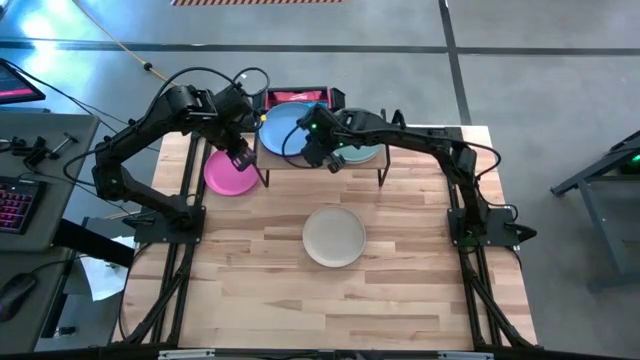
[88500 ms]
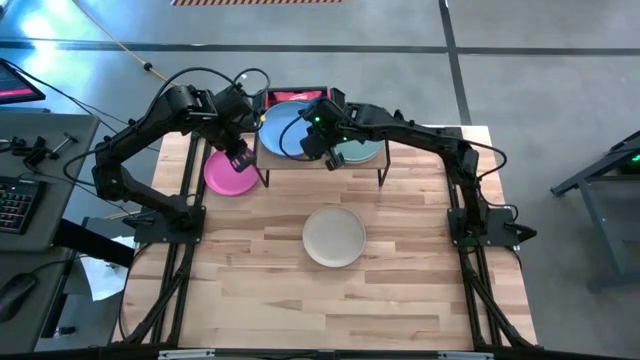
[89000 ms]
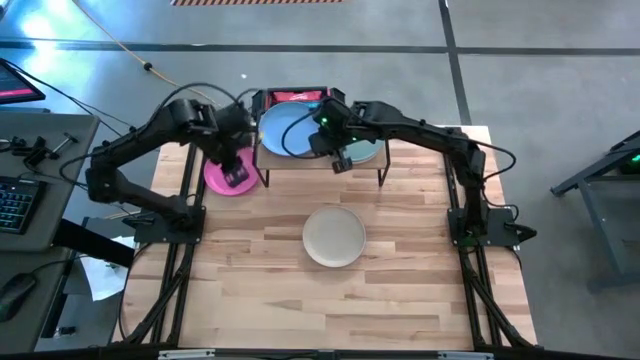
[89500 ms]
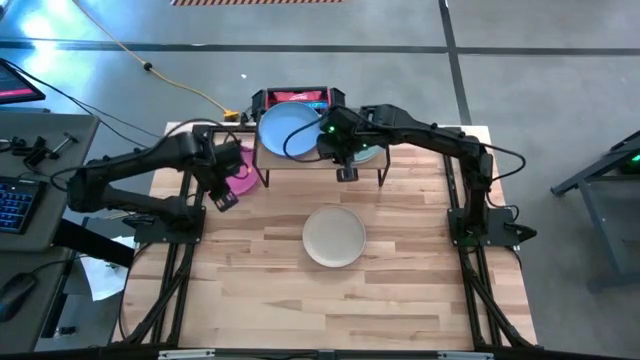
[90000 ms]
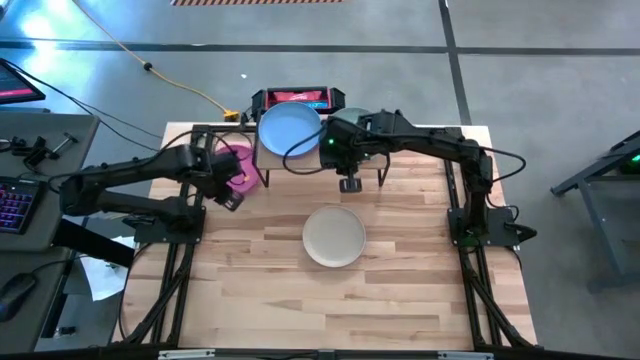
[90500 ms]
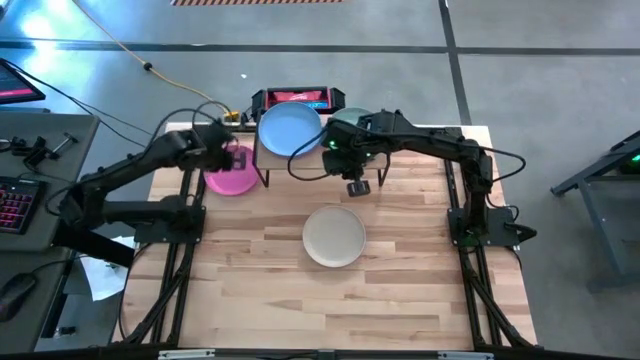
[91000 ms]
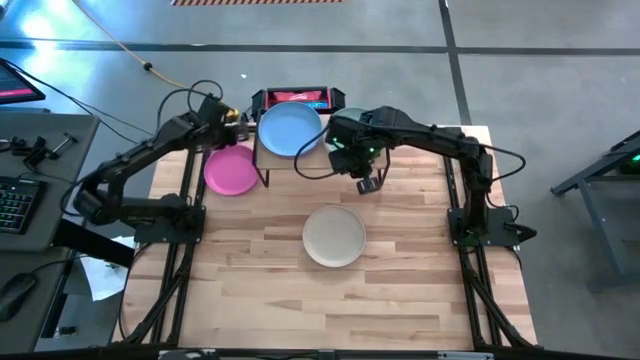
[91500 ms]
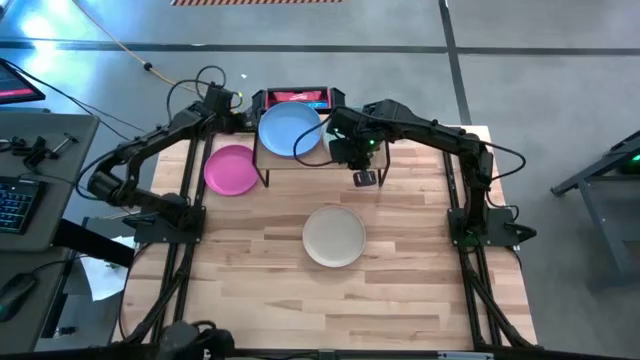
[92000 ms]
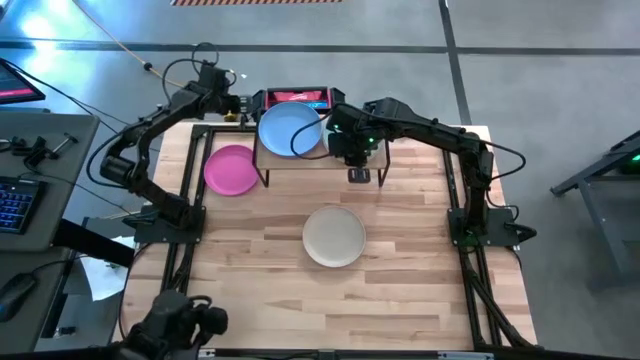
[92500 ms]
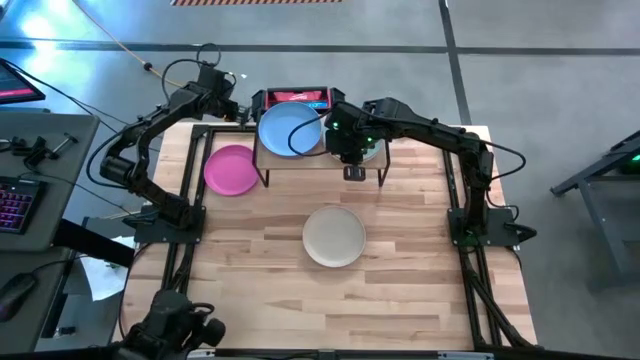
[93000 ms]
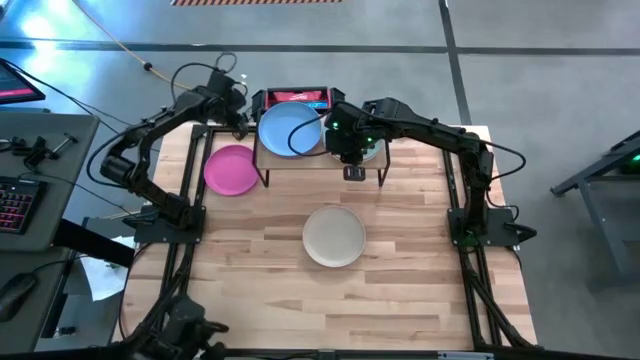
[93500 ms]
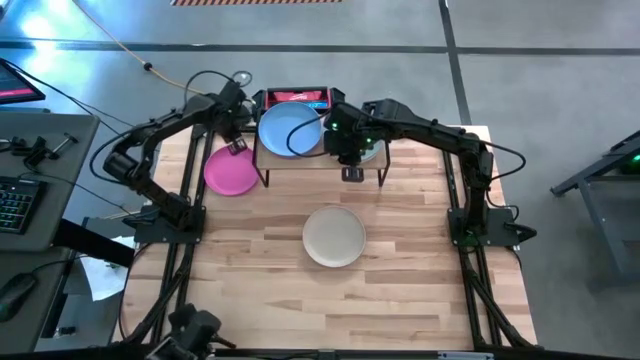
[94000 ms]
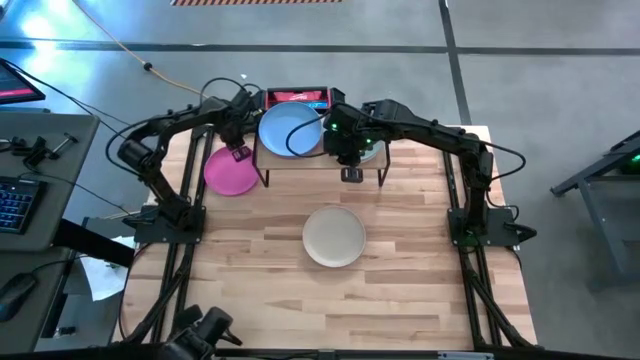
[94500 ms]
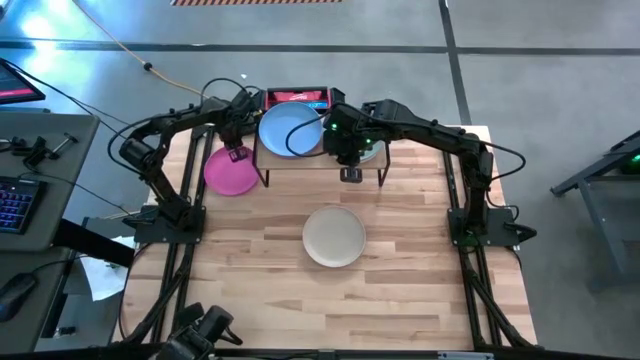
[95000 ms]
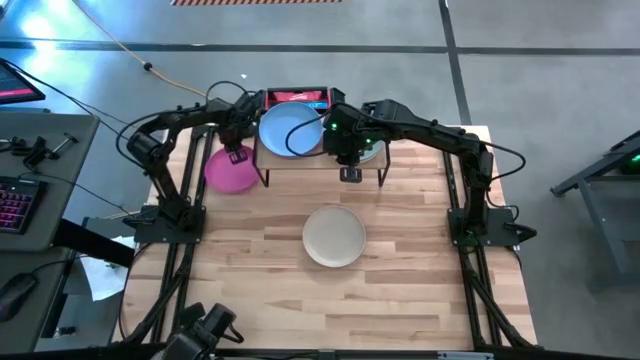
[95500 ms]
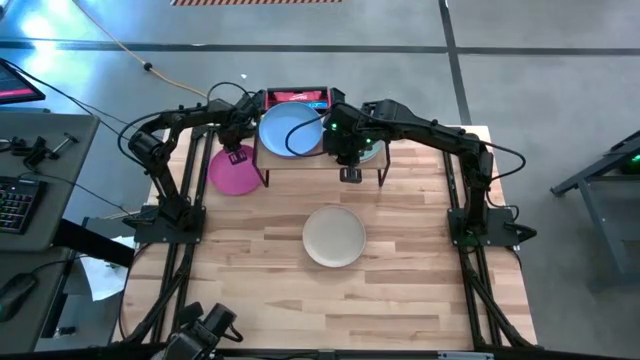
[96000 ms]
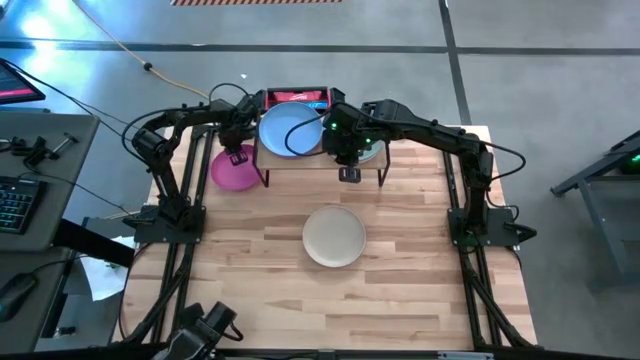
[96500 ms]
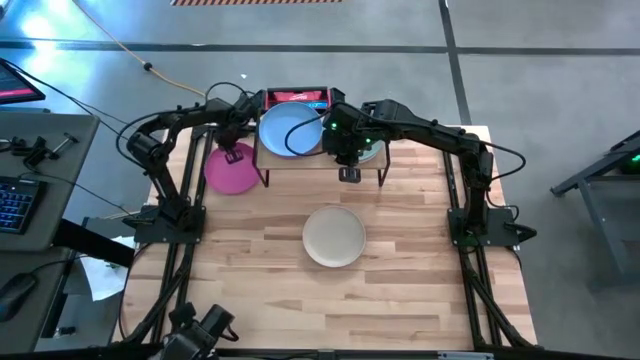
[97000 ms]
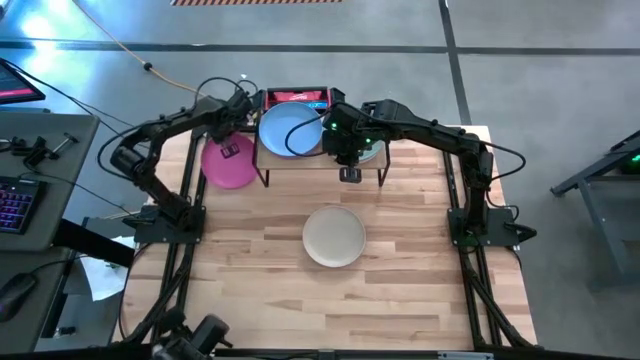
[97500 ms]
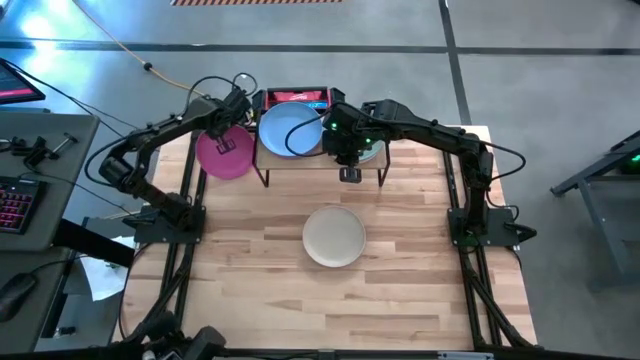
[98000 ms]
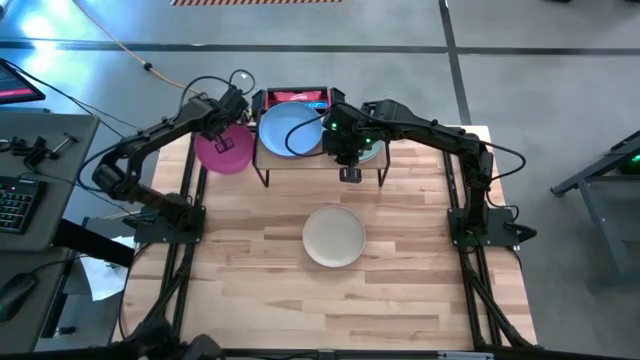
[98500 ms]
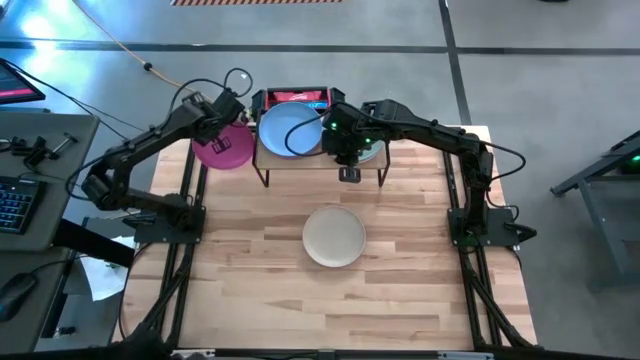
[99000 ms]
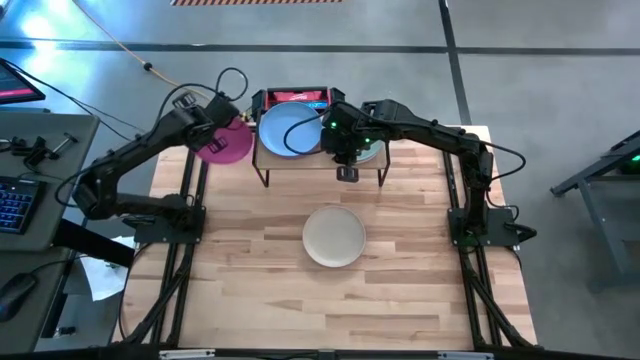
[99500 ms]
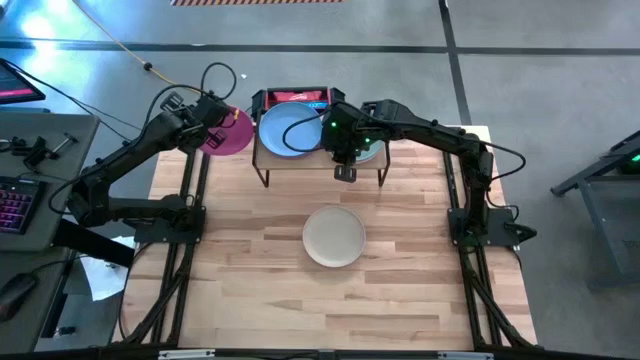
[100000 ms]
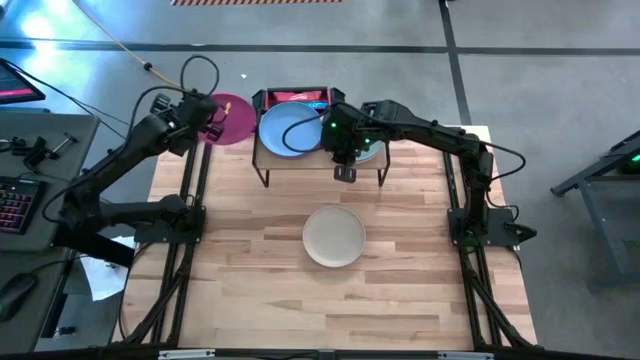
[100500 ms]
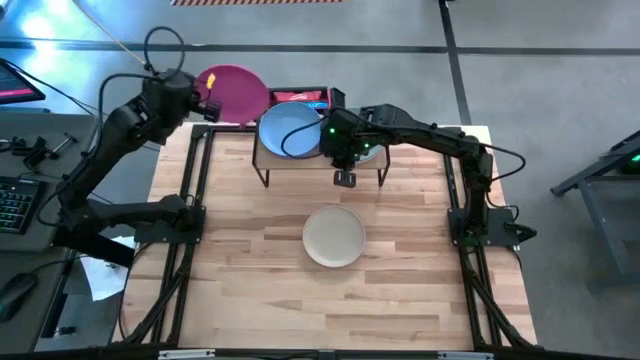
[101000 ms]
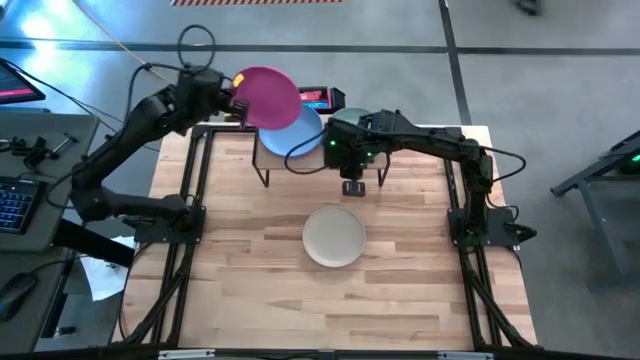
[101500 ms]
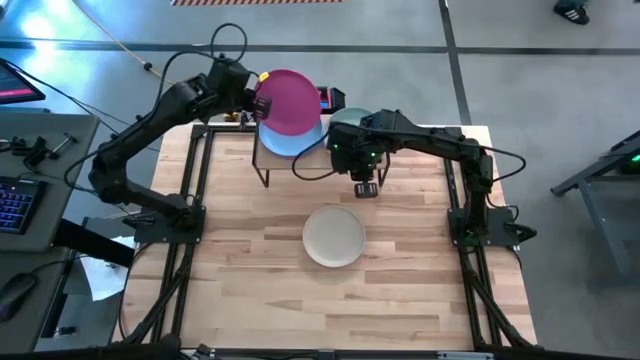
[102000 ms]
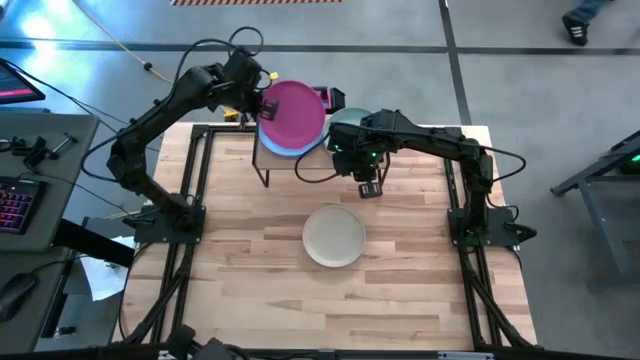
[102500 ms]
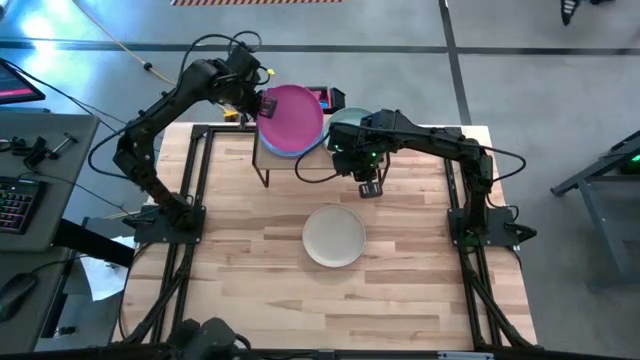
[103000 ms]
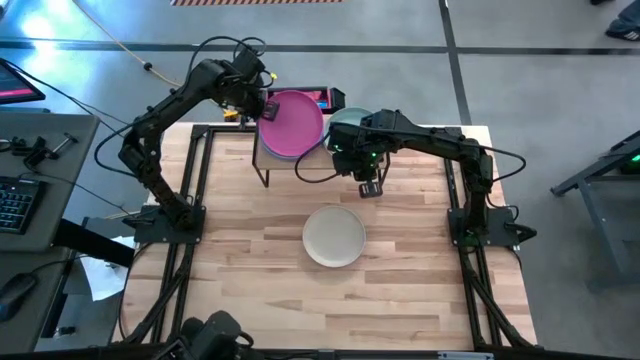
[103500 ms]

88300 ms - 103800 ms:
Task: Place and stack plates onto a shelf
Stack the pink plate on top of the blue stacked plates on the shelf

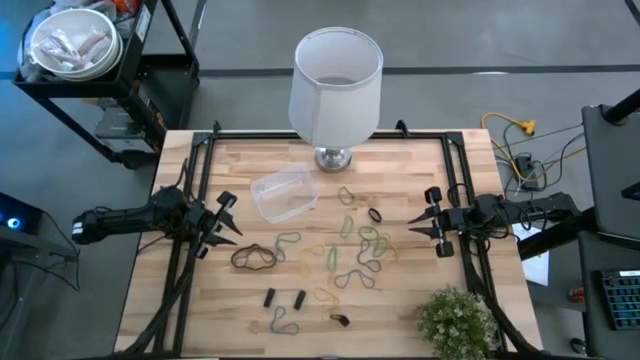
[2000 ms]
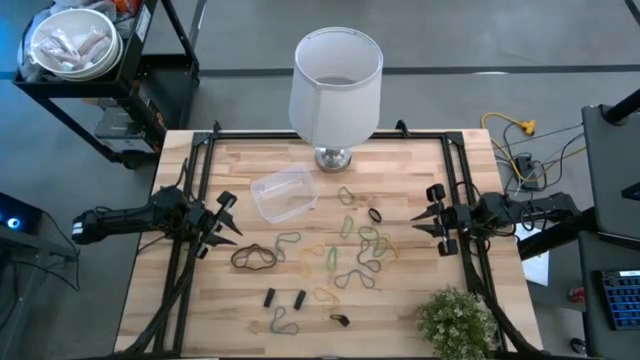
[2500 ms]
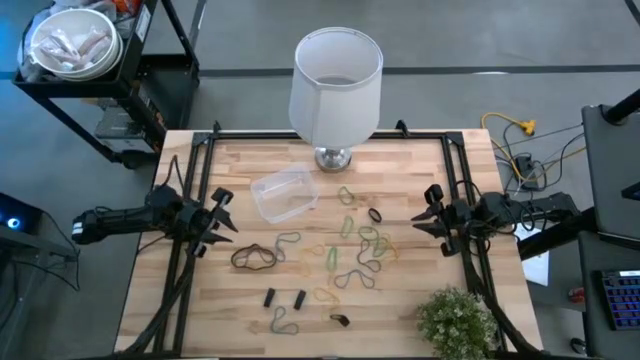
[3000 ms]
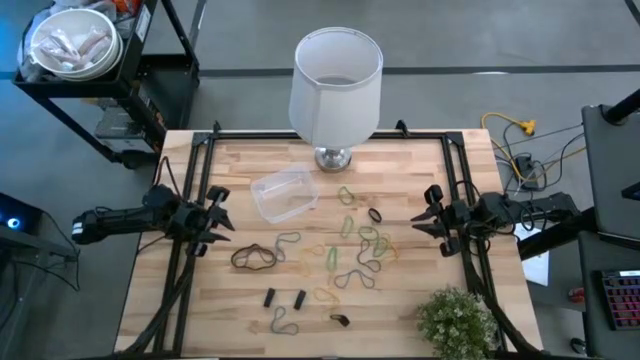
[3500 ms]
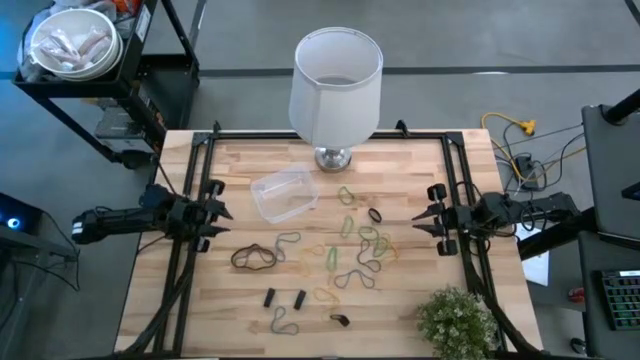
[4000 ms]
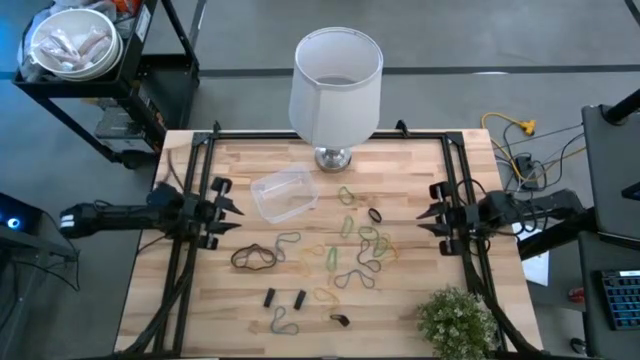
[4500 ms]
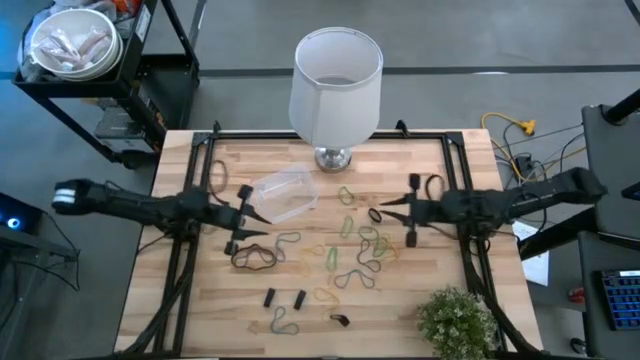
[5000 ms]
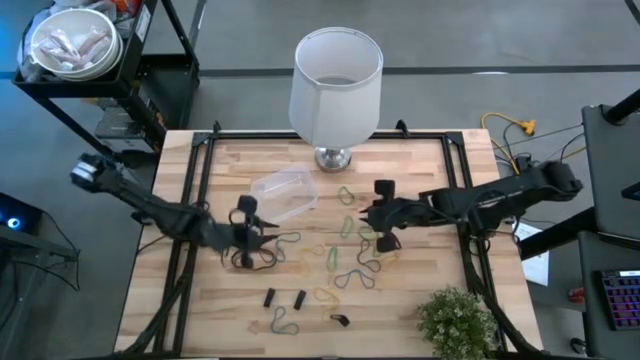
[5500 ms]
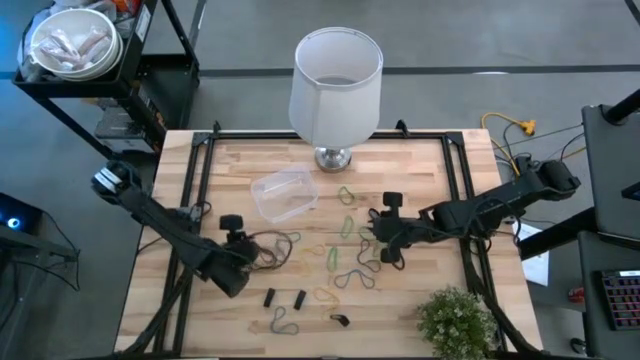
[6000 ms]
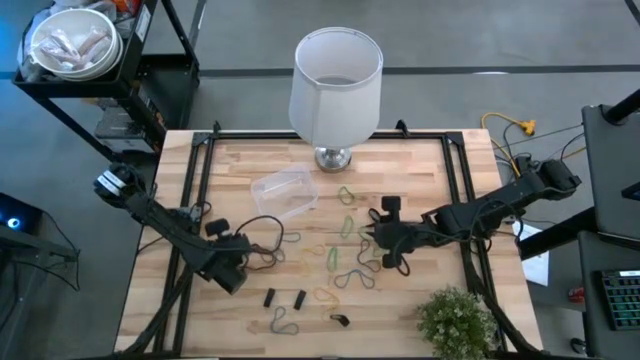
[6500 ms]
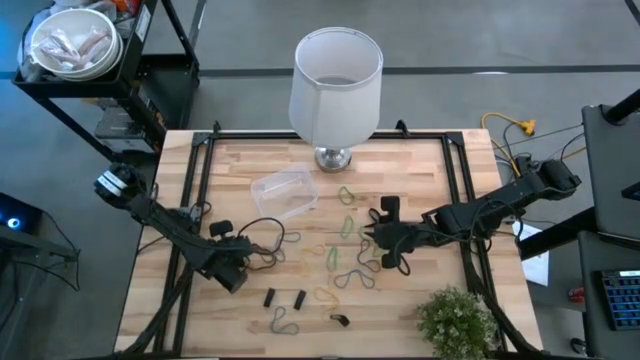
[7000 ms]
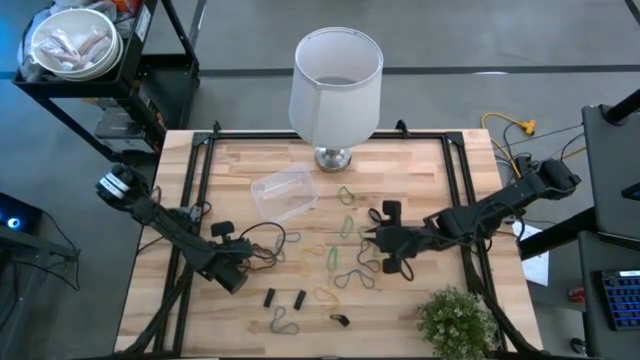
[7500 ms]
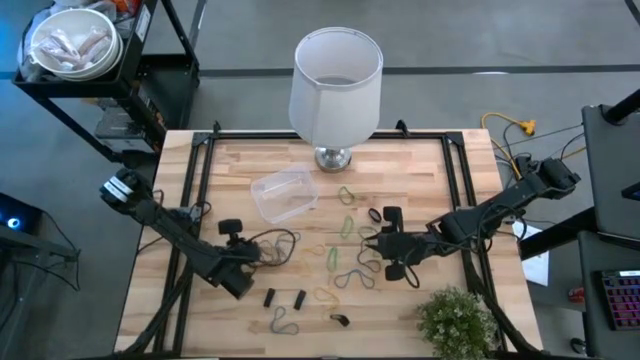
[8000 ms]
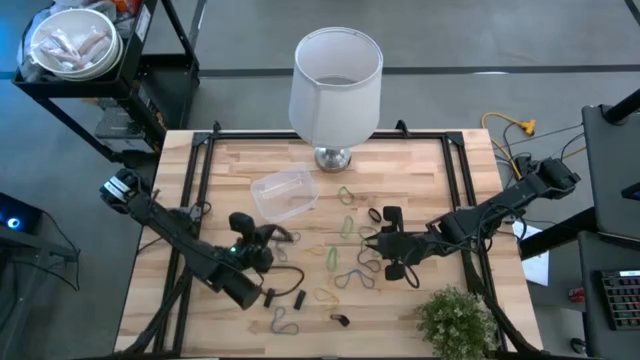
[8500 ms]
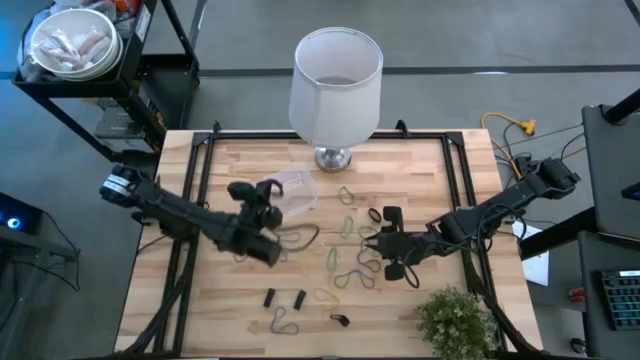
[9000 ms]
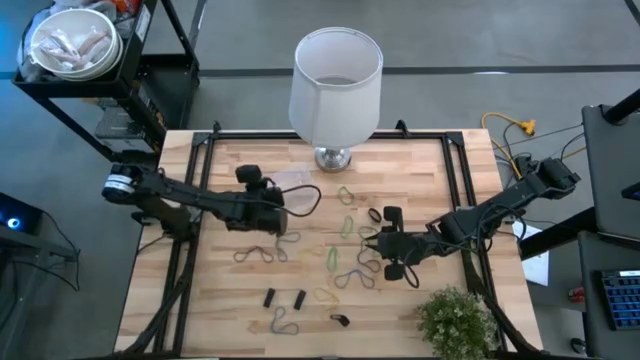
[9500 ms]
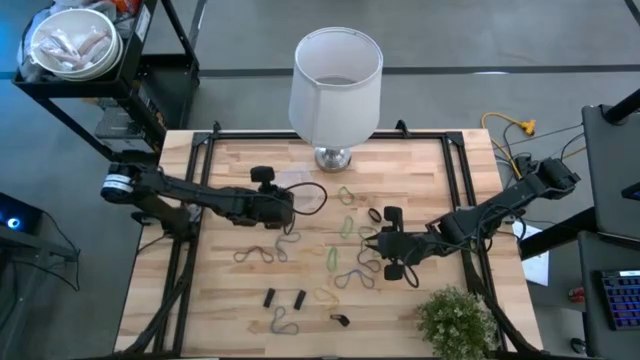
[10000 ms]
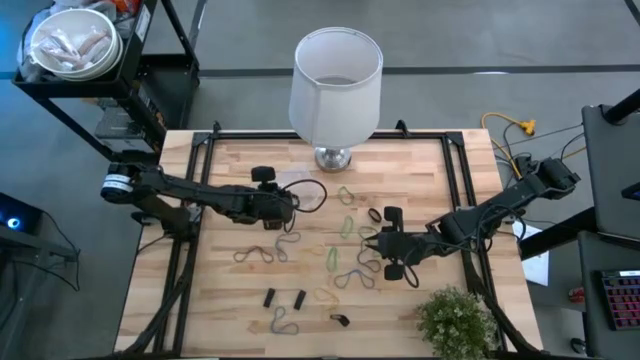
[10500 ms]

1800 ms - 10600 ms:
Task: Pick and place rubber bands into bin
Put the black rubber band into the transparent bin
